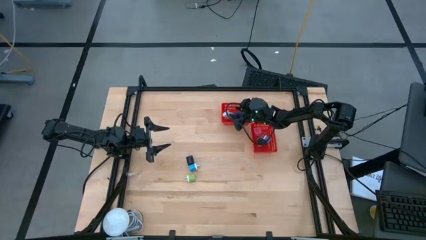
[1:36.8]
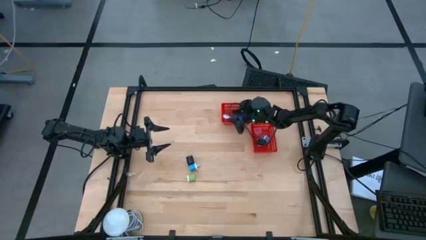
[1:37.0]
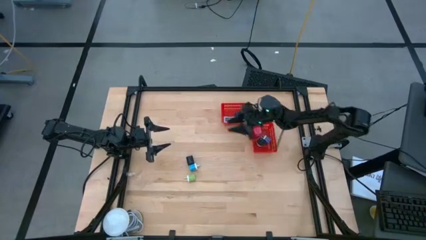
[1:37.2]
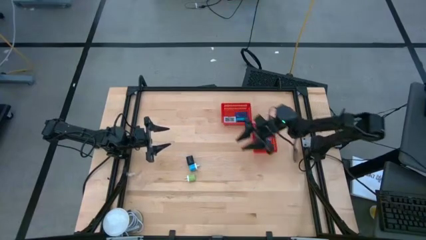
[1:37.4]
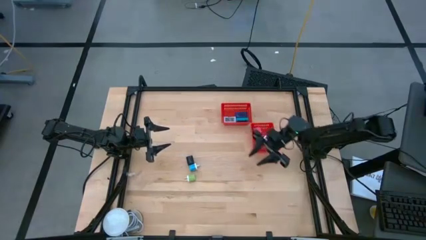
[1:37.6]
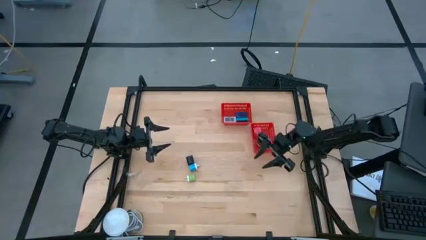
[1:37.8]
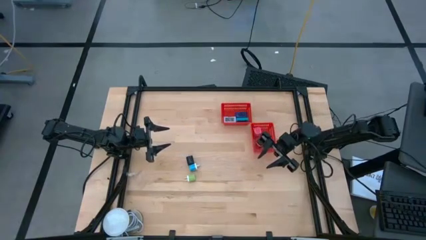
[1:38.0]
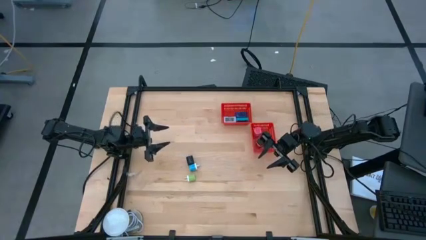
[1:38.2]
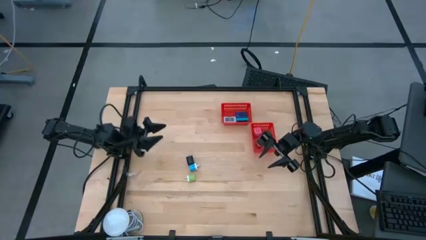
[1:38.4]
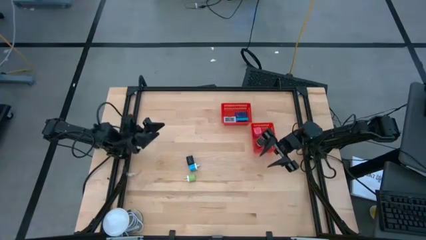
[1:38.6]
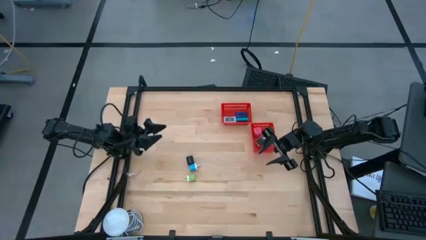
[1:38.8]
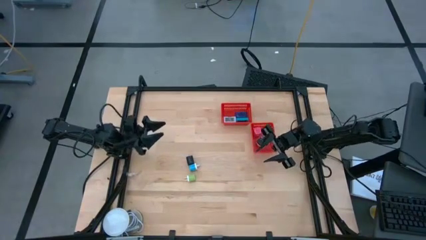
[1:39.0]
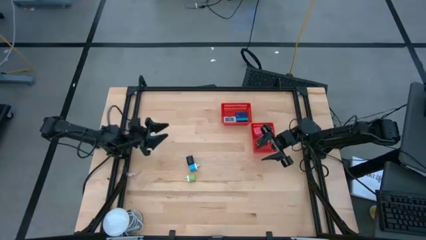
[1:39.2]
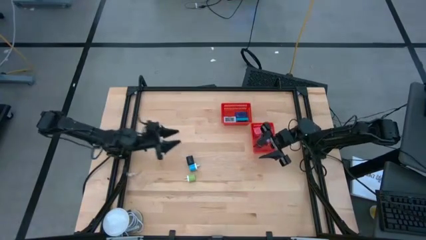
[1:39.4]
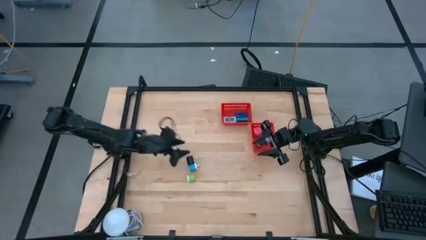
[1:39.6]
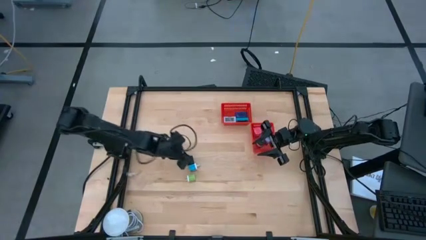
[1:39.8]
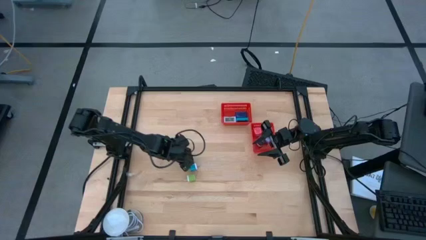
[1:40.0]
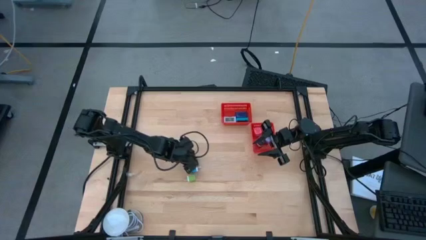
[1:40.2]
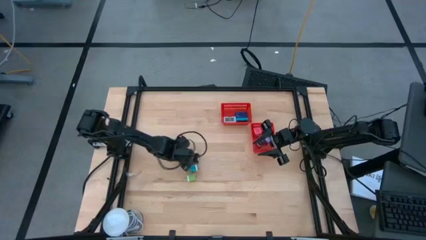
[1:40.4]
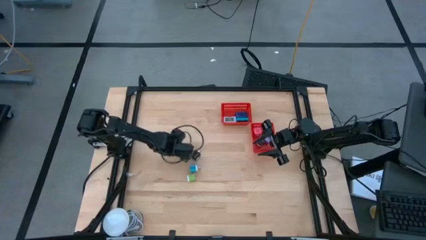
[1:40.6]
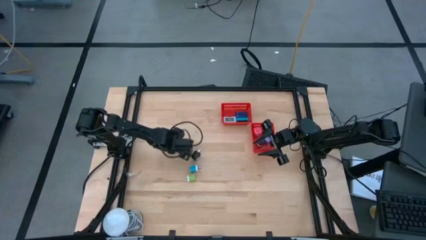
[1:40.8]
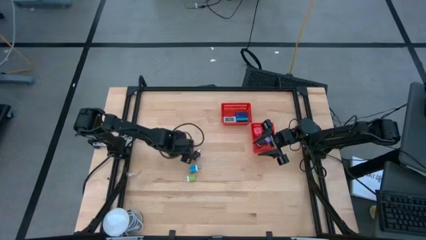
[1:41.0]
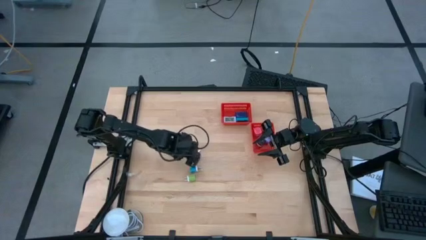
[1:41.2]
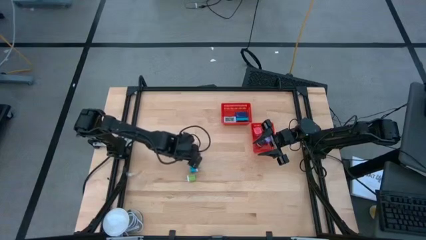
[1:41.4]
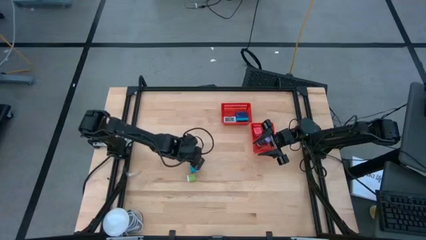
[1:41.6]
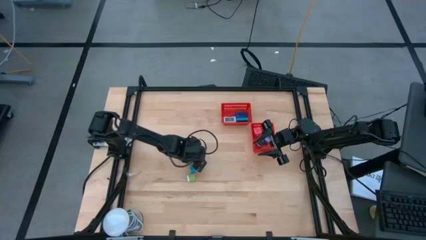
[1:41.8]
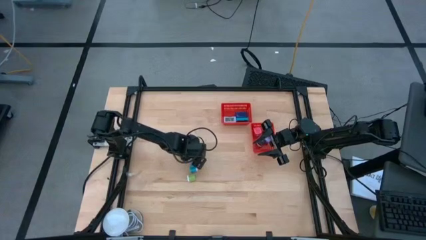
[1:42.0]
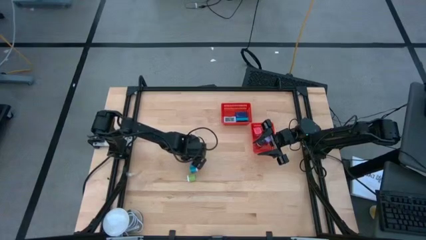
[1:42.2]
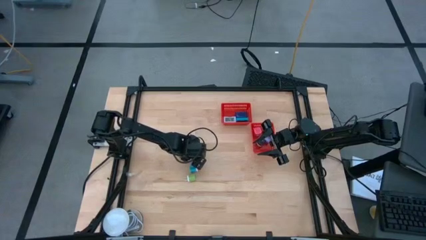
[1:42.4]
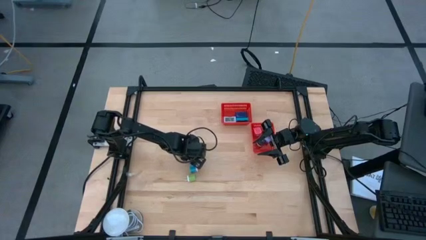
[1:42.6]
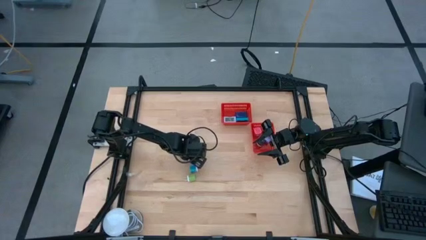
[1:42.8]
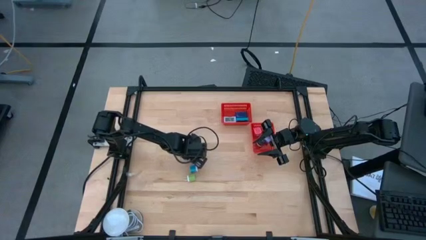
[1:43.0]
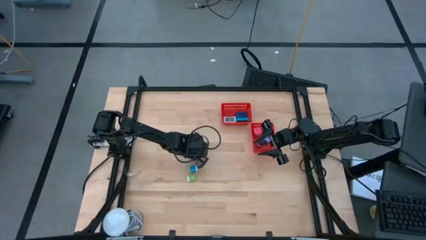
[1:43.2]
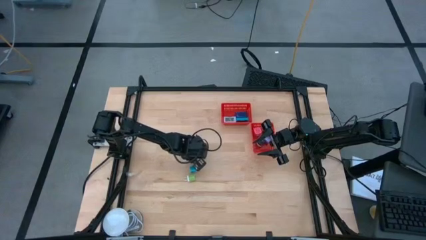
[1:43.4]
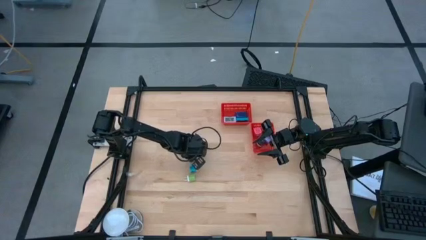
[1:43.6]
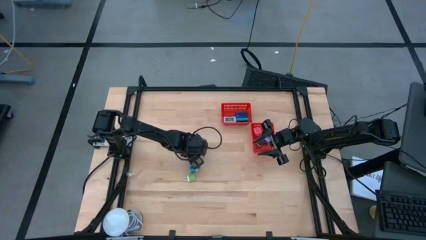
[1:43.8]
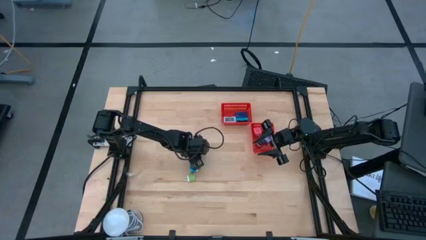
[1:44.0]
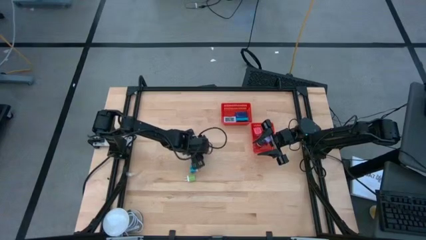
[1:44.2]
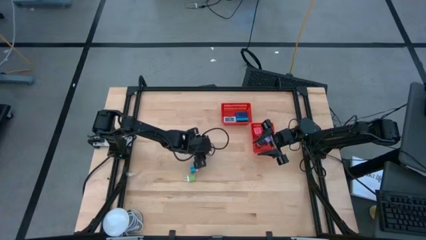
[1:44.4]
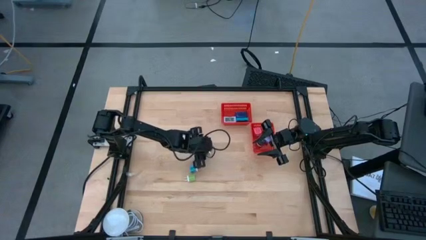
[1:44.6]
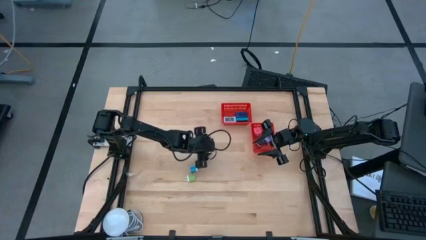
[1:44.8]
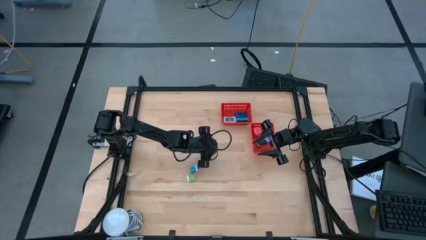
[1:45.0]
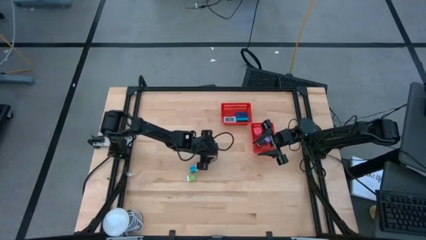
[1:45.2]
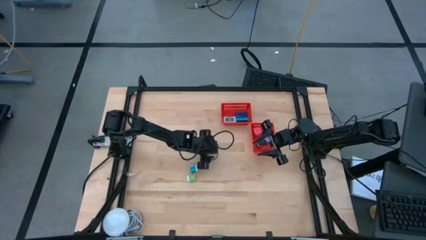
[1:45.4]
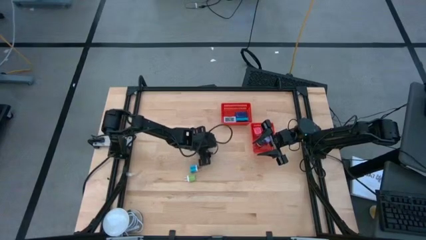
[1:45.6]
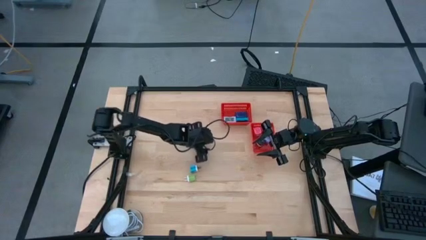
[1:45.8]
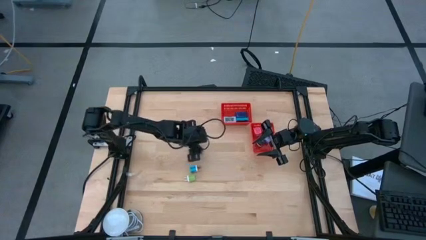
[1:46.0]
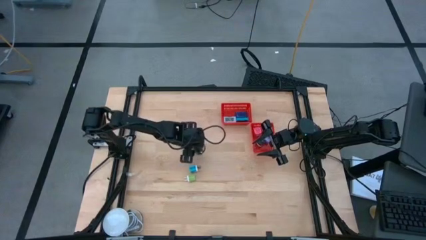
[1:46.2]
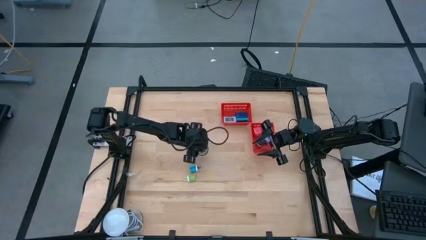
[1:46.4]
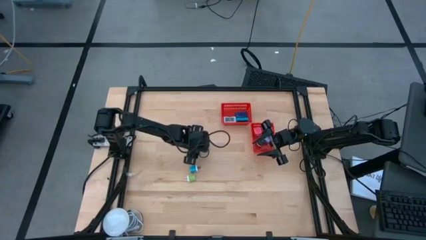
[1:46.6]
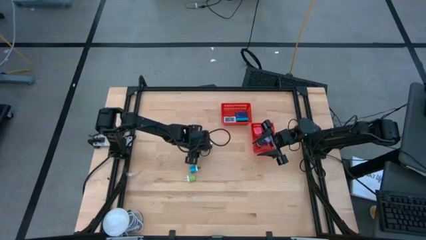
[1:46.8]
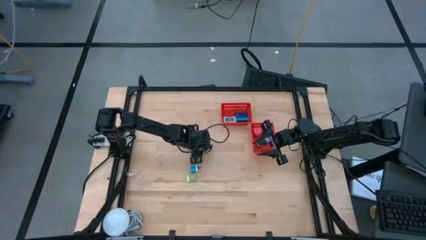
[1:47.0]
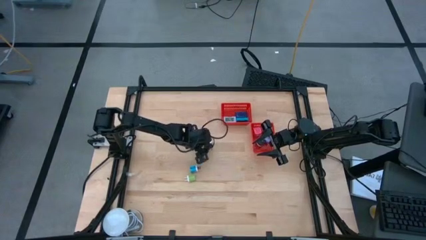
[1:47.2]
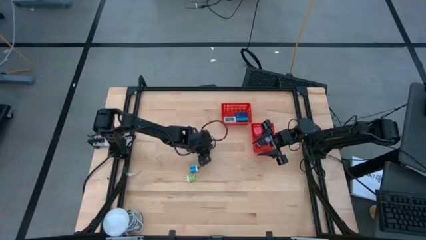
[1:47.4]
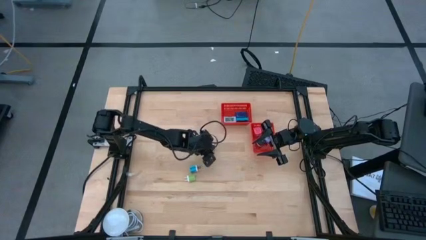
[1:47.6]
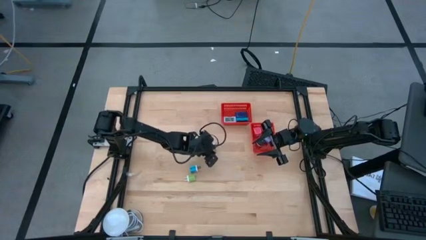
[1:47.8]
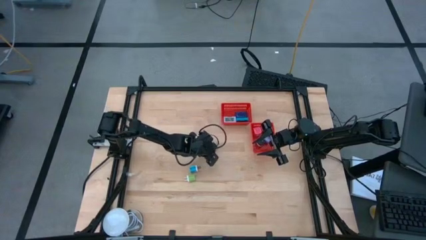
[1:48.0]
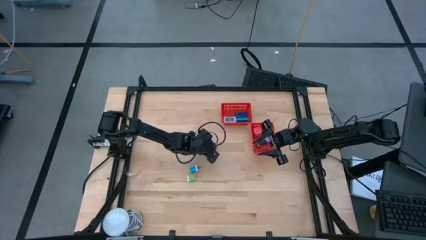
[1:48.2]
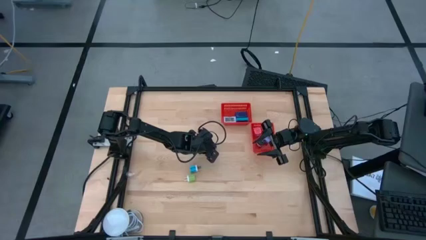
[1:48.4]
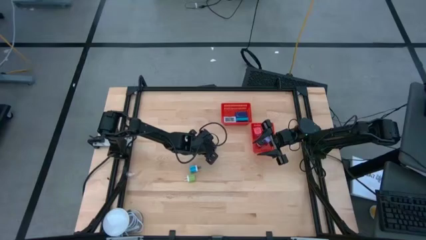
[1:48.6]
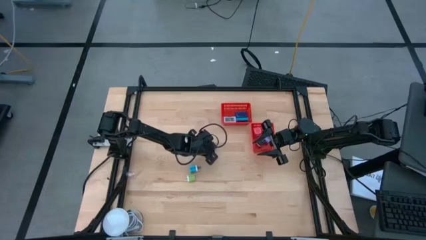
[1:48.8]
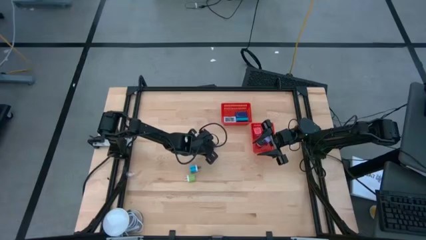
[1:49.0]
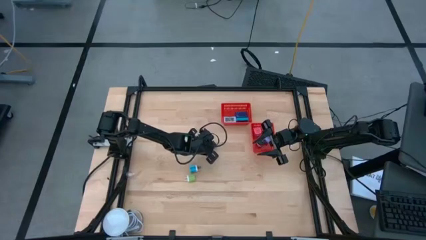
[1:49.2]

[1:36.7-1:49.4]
Task: Pick & Place Office items
Put the black charger adapter into the bottom red bin

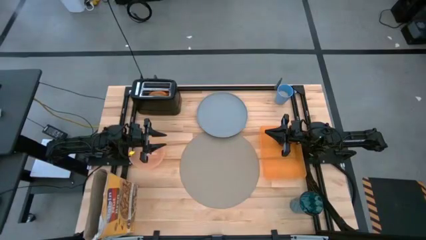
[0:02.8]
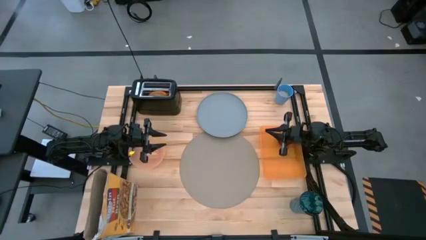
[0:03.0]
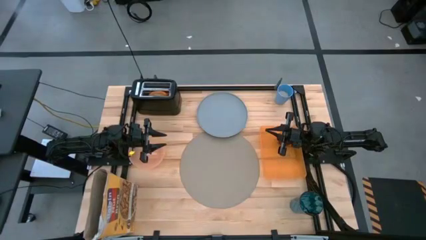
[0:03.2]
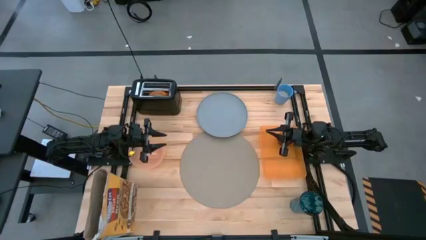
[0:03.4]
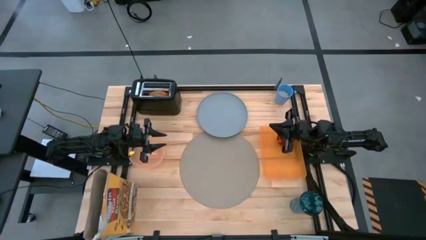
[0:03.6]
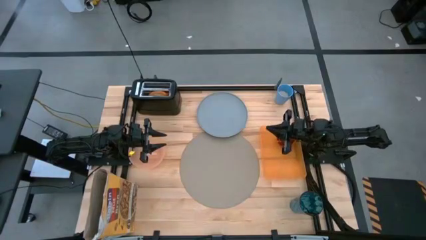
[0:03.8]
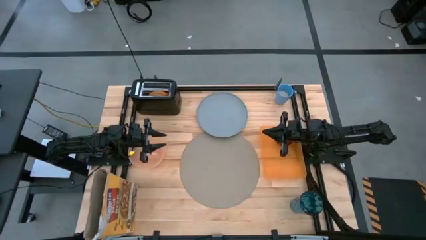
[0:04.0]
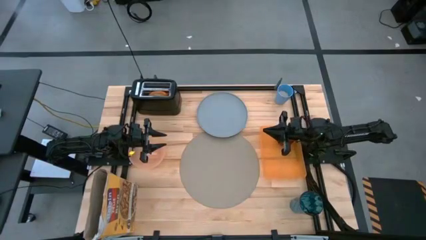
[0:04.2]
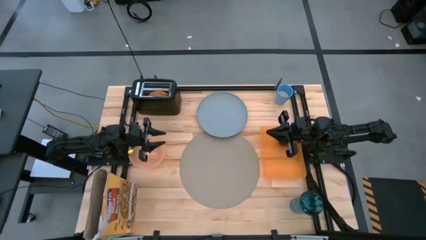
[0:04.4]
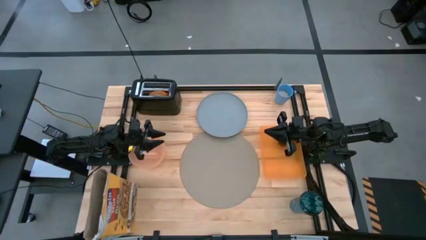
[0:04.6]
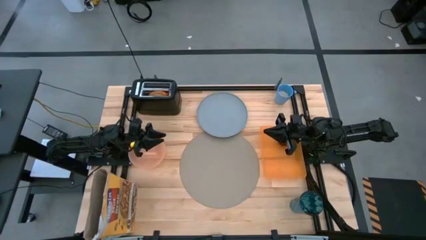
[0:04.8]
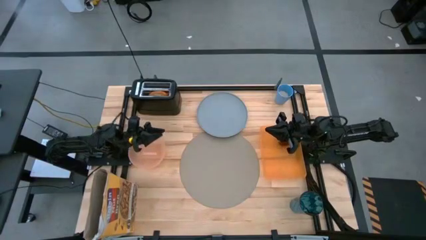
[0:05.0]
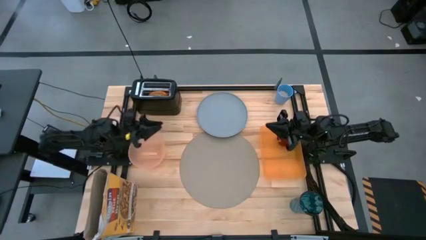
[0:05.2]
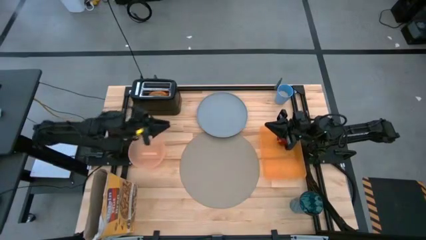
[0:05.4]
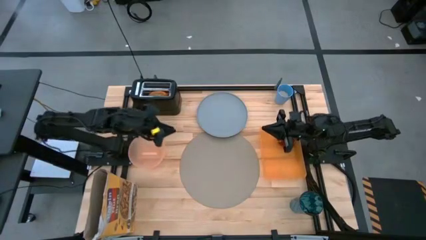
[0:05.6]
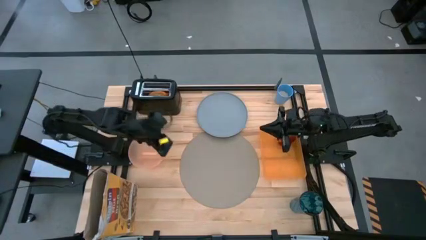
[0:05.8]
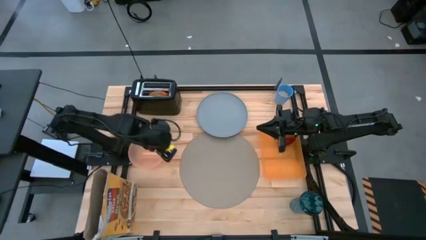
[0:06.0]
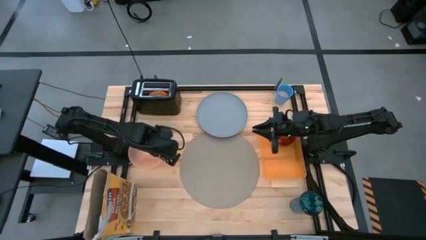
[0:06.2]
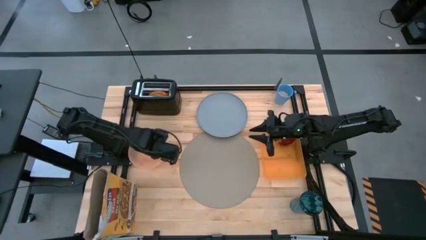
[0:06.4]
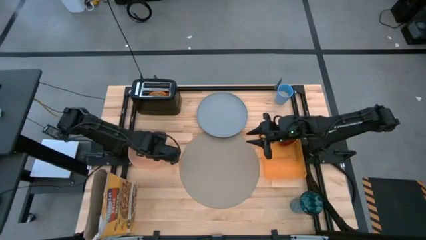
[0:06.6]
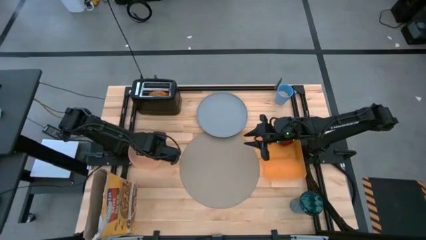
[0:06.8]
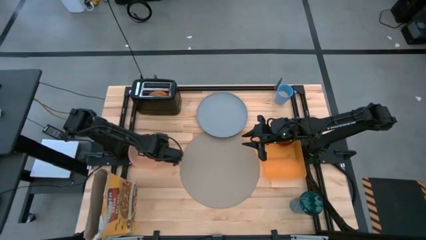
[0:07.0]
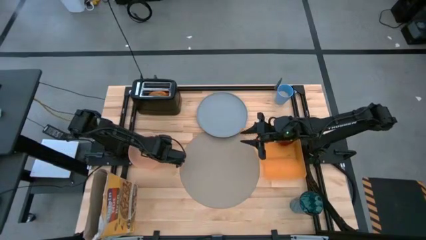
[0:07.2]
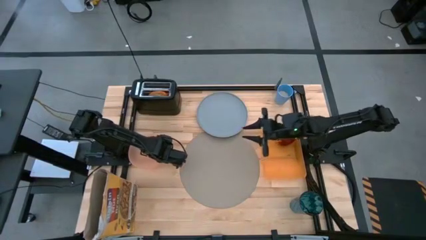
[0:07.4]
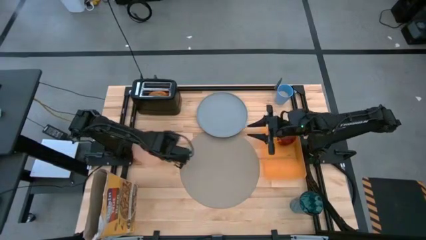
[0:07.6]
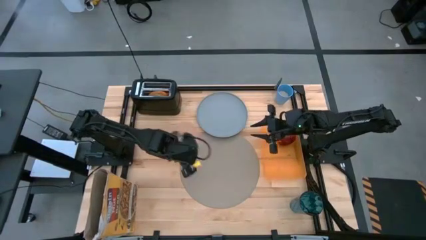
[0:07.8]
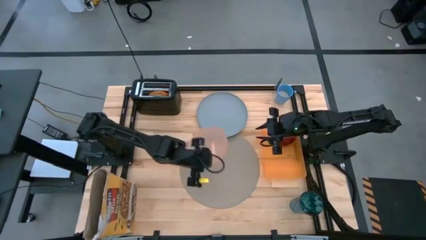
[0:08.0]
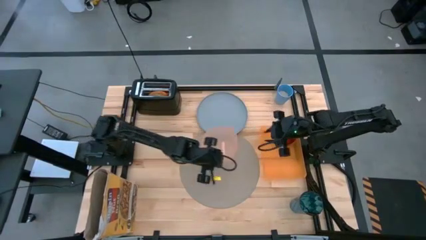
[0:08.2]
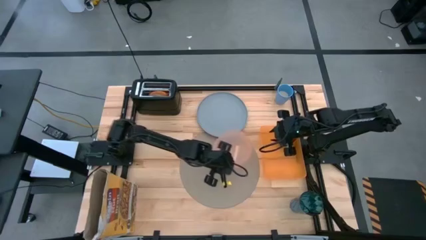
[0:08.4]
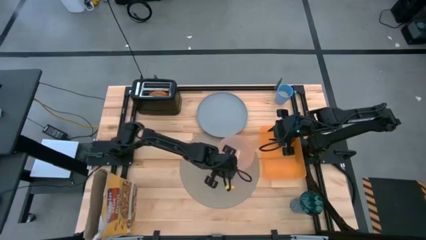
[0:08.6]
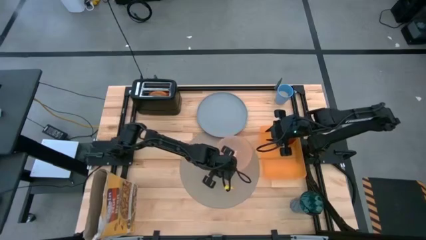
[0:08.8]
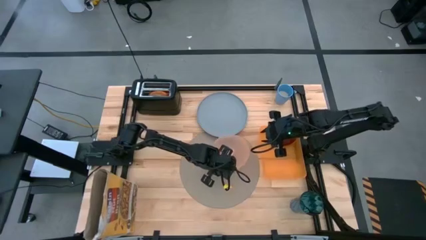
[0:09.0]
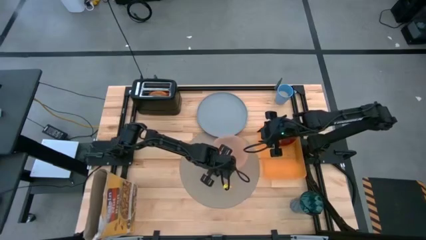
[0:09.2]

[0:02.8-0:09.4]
Task: Arrange a breakfast setting
Put the light orange bowl on the gray mat
